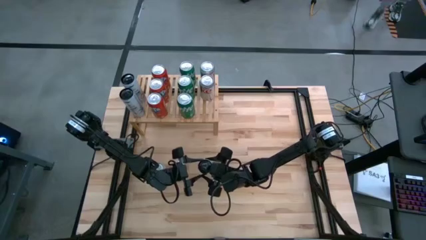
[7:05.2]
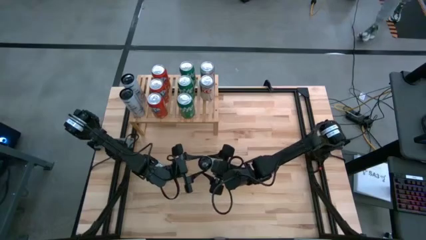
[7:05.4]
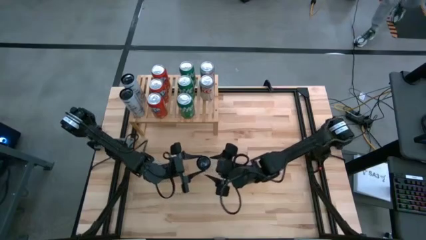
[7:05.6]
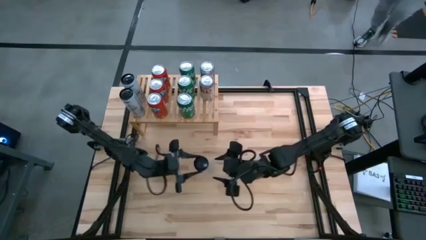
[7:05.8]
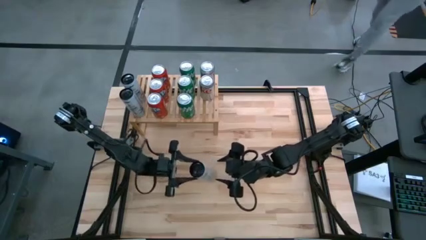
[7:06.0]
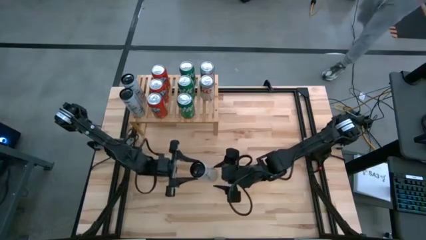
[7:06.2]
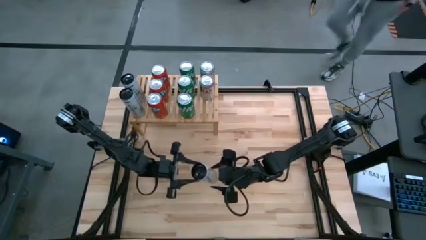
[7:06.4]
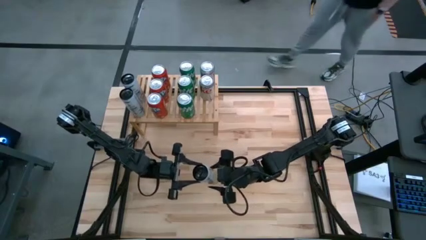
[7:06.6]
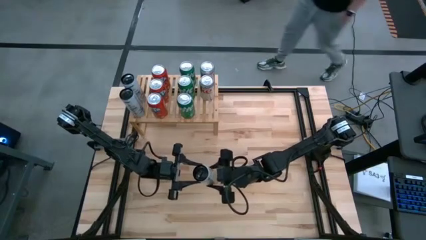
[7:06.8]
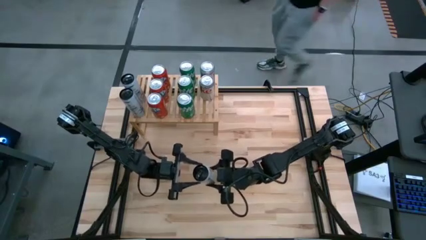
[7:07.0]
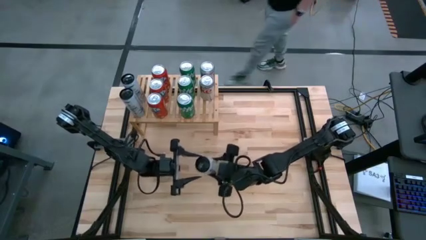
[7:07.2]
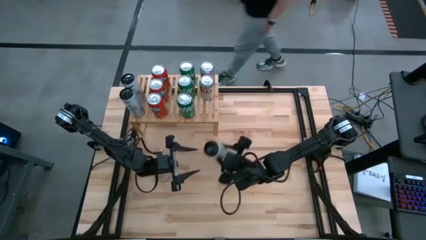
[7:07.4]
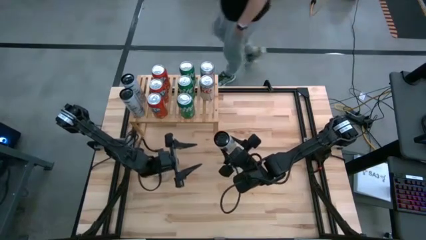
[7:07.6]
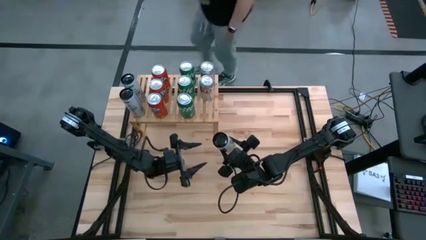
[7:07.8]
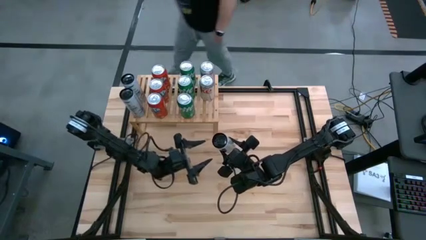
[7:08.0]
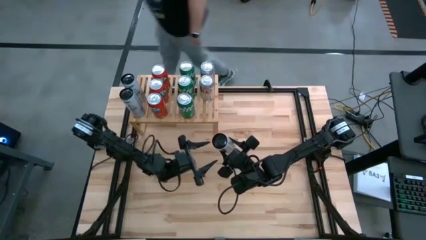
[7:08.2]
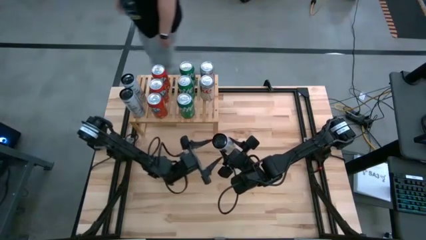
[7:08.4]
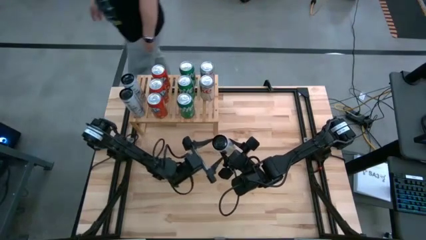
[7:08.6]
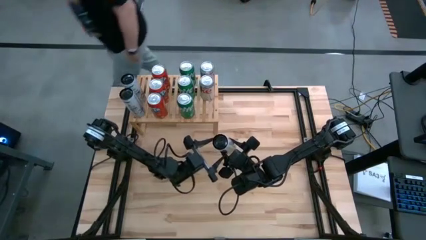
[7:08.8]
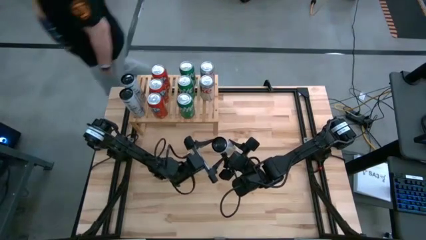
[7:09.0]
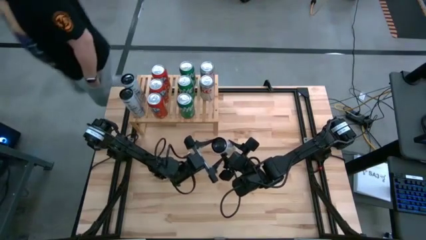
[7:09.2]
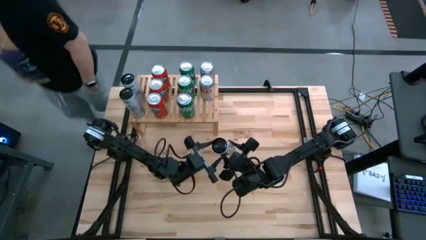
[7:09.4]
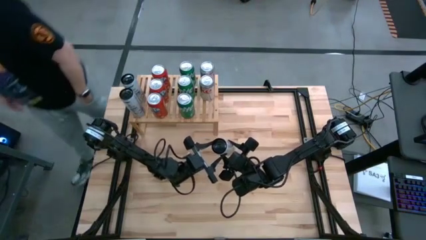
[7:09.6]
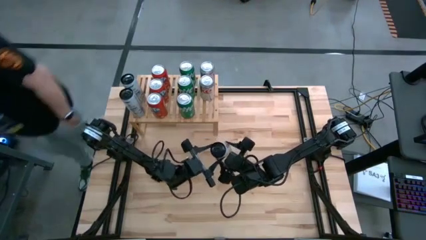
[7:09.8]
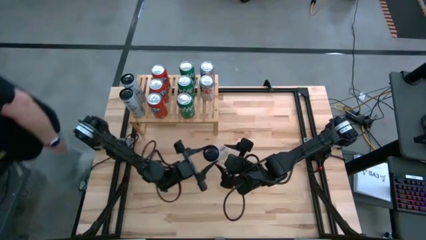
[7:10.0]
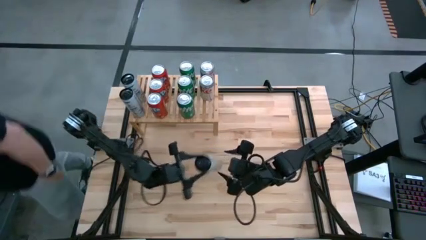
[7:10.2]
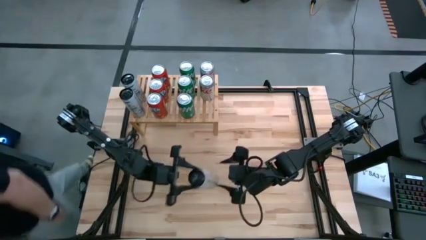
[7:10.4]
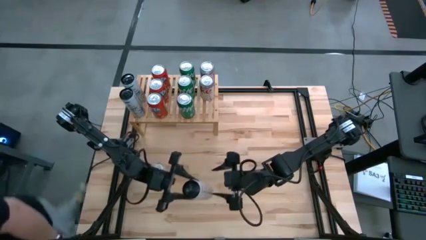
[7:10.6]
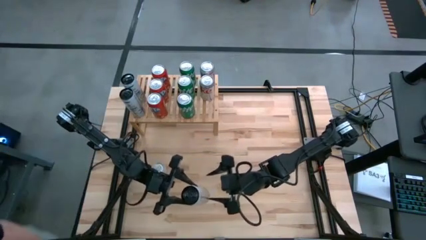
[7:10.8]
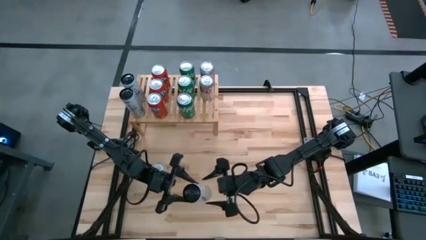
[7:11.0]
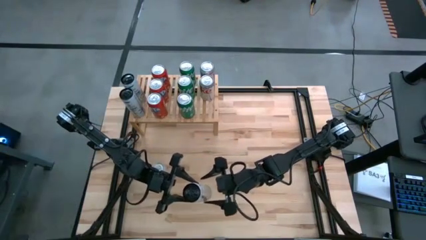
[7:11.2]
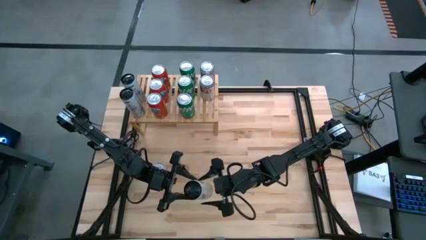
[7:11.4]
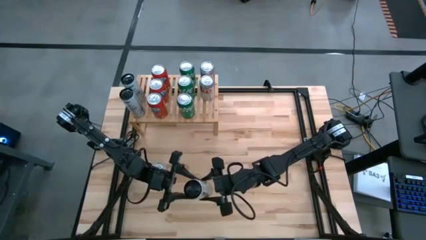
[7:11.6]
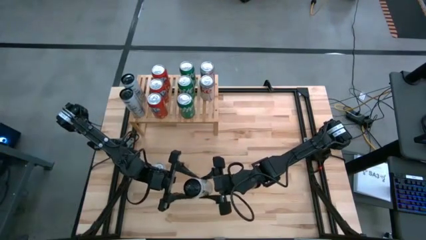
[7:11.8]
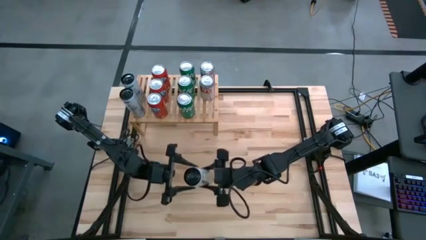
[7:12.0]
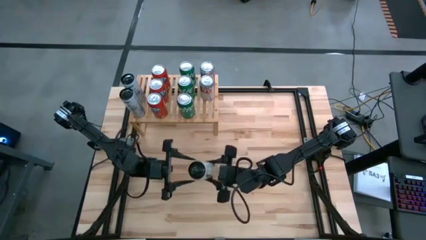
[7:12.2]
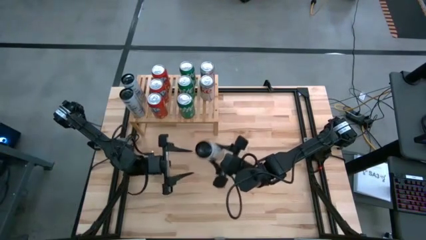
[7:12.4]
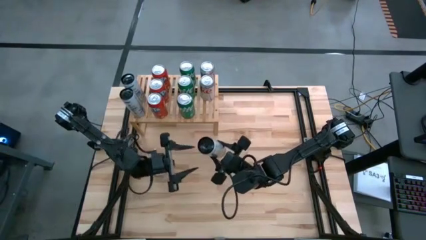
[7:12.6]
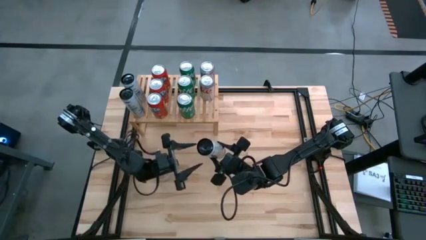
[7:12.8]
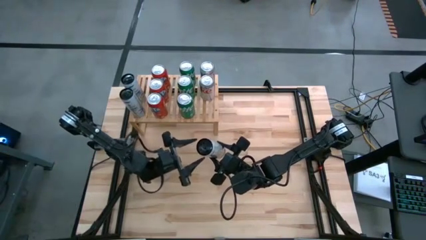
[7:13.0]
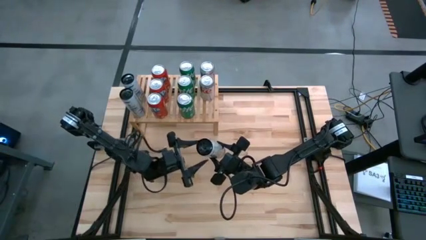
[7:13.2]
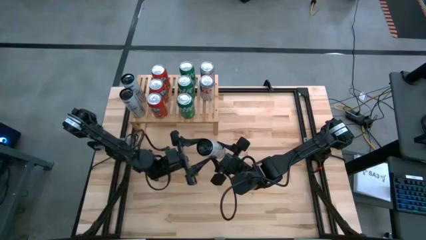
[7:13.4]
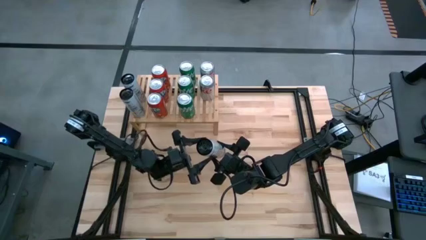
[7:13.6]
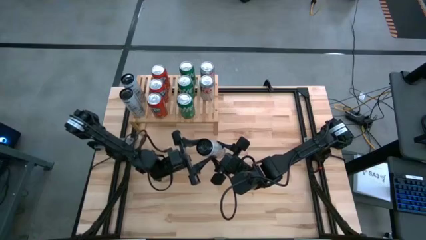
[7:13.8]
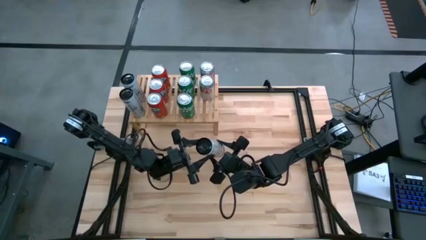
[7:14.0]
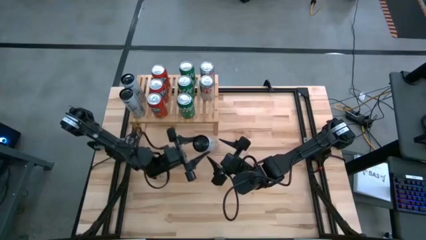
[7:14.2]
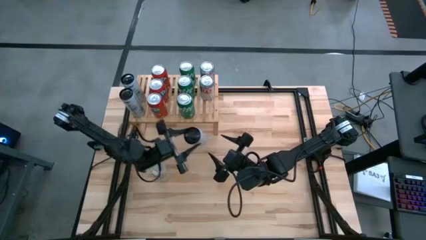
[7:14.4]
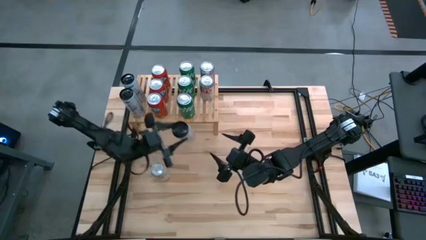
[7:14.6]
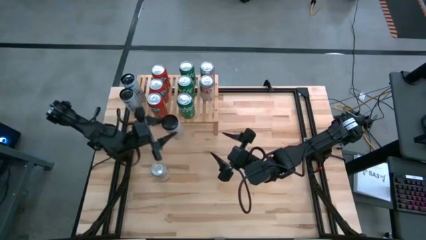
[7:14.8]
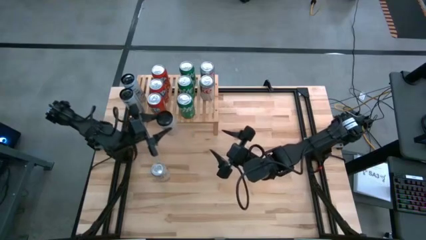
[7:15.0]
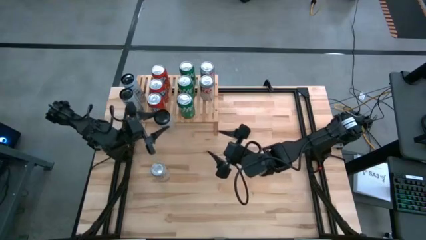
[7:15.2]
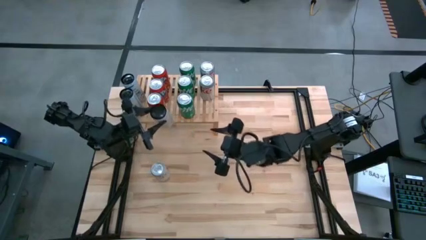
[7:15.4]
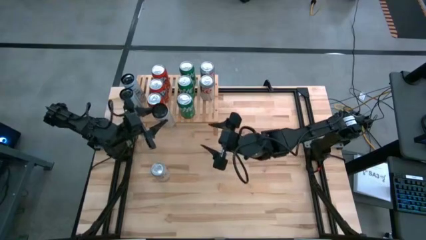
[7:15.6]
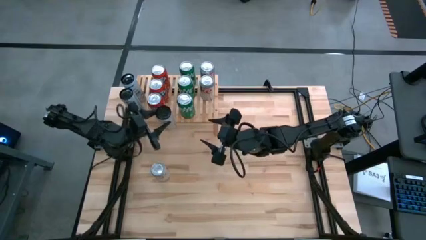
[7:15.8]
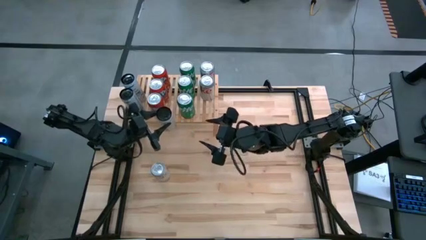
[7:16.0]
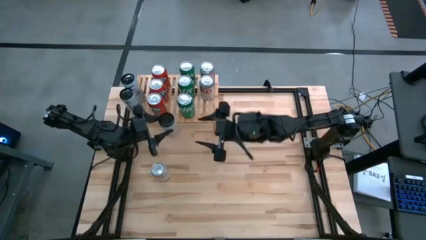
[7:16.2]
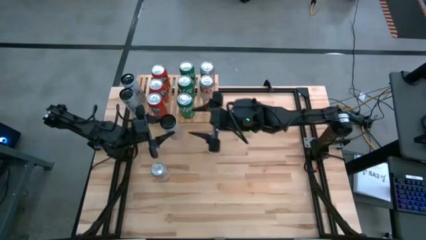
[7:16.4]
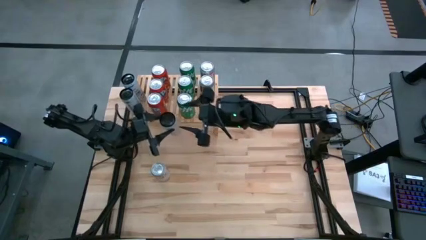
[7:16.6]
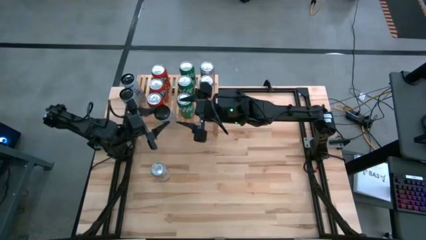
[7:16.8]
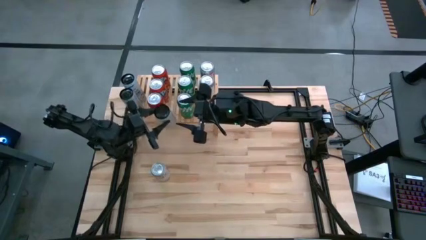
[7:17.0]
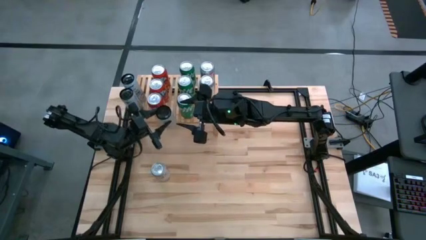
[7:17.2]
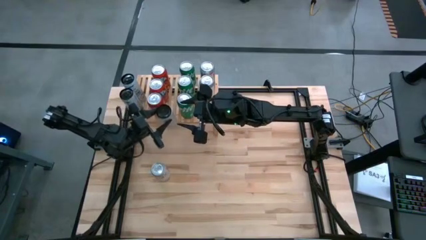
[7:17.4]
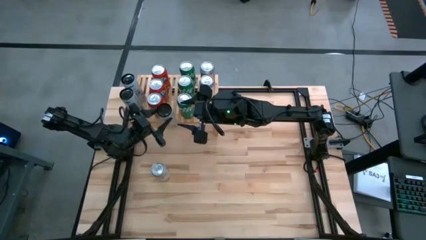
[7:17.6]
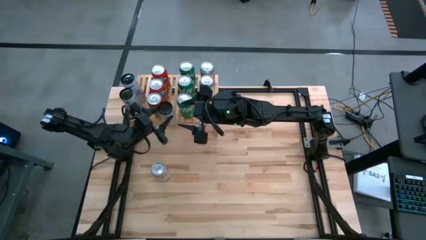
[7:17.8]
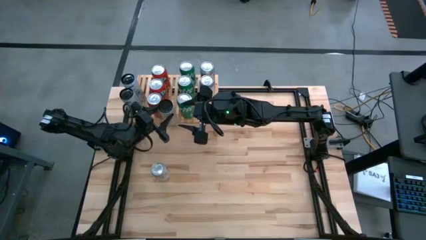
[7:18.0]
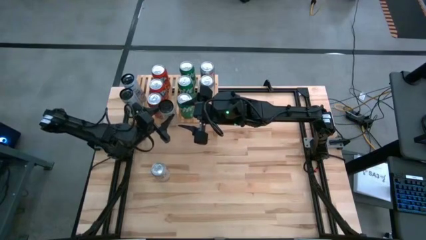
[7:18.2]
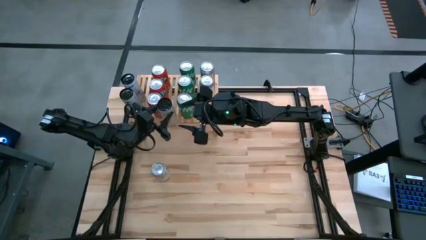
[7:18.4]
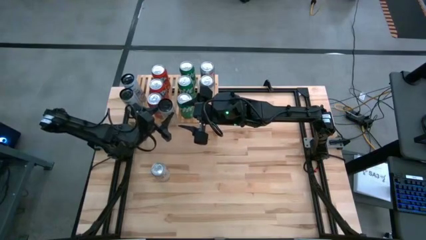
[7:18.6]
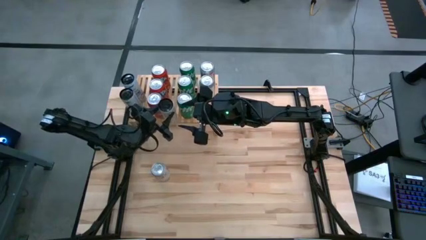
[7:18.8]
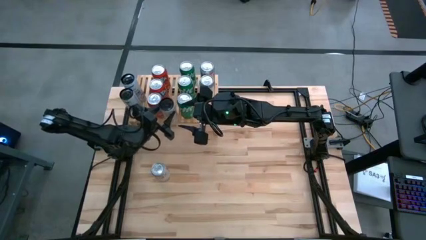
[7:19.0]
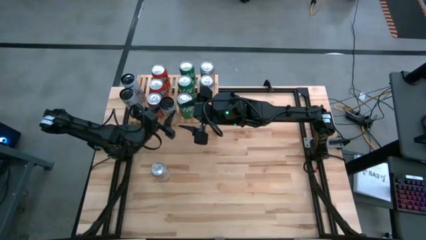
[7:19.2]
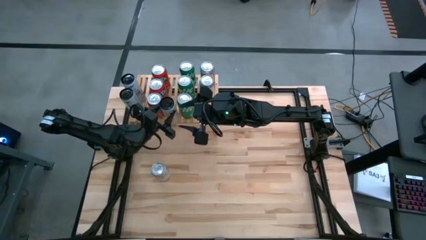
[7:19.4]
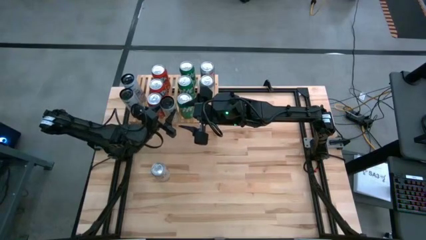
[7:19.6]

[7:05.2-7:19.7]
Task: Place canned beverage on shelf
Put the white and yellow soda can on the shelf aligned with the other white and yellow soda can

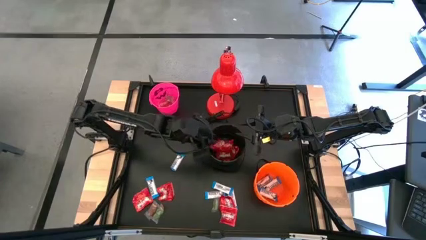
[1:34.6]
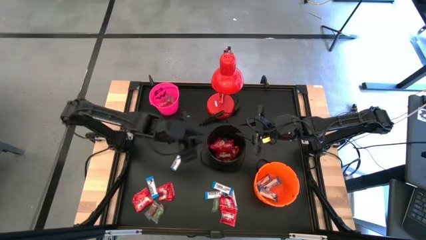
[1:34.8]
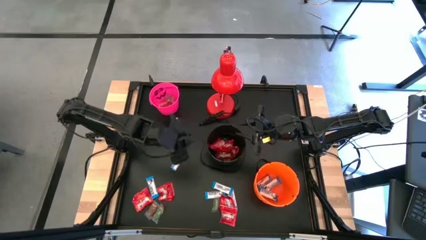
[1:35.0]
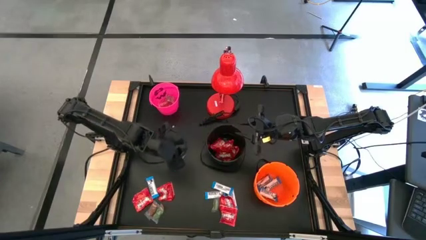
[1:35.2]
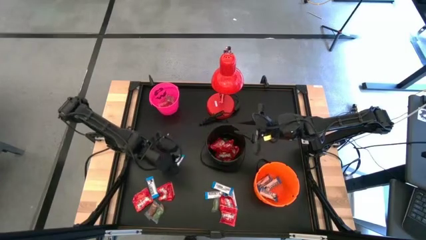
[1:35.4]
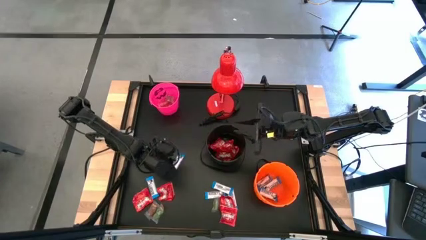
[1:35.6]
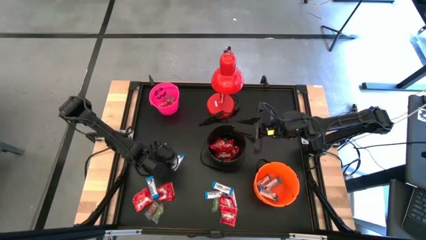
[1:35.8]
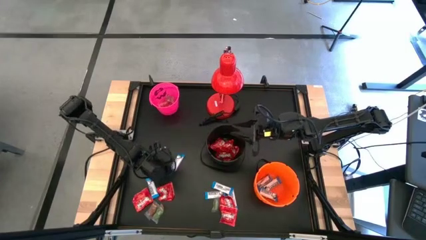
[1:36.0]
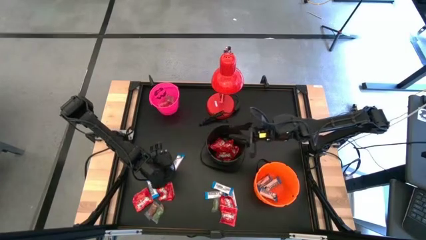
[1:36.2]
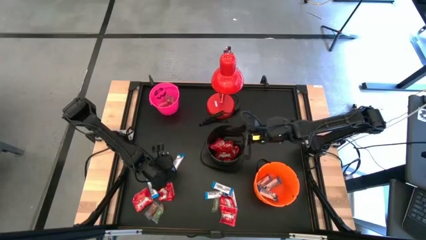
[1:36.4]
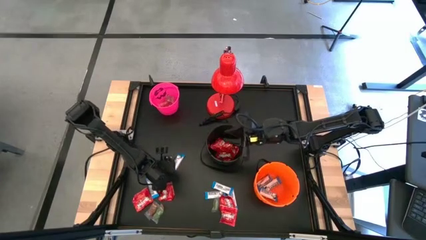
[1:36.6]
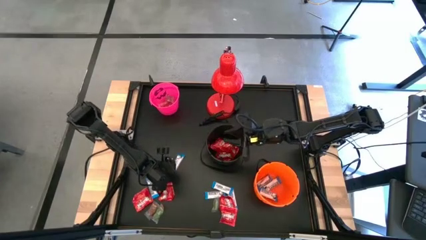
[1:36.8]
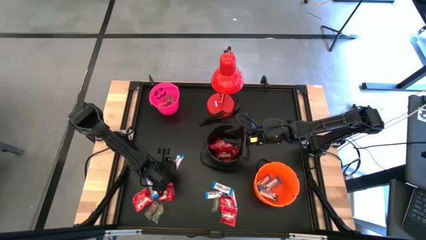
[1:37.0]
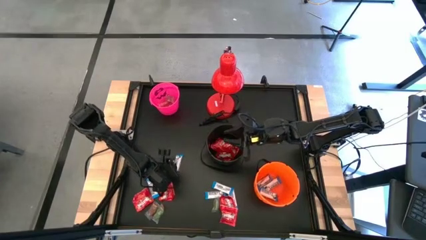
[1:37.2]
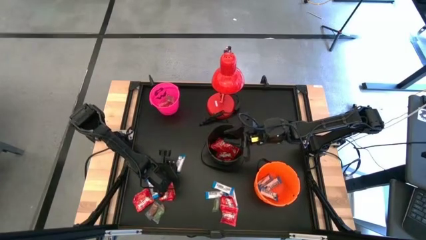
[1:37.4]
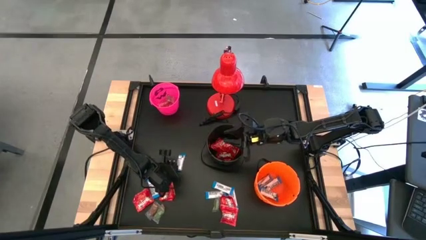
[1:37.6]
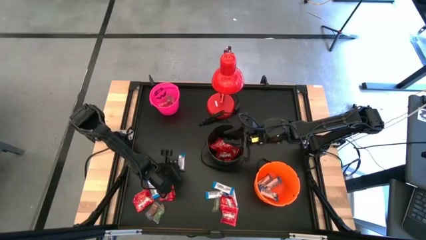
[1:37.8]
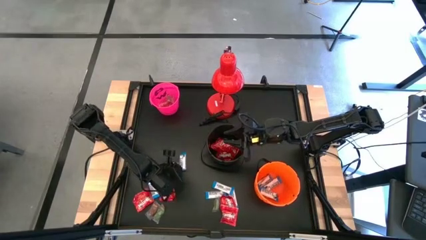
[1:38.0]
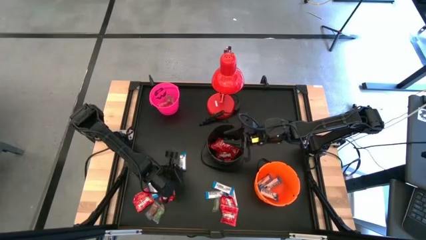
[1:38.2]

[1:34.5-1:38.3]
Task: Organize candy in baskets
Put the white chocolate into the orange bucket
